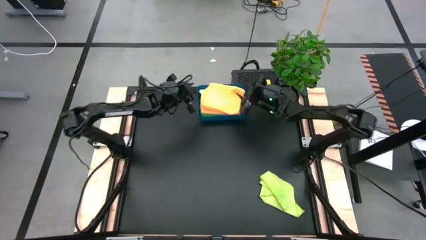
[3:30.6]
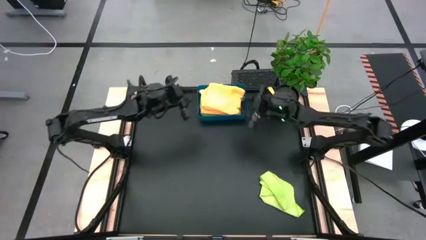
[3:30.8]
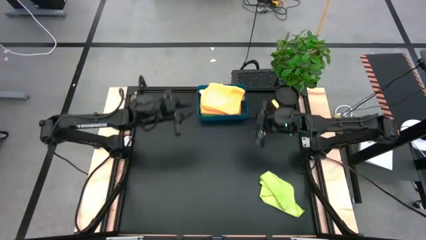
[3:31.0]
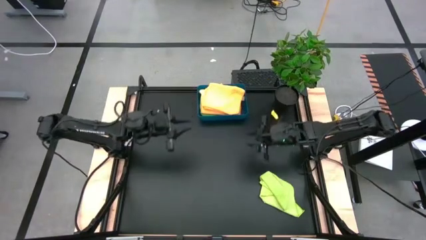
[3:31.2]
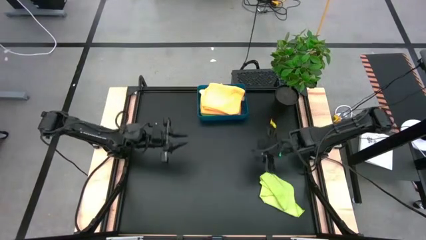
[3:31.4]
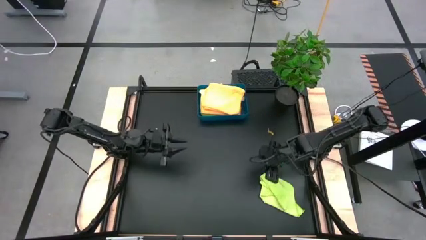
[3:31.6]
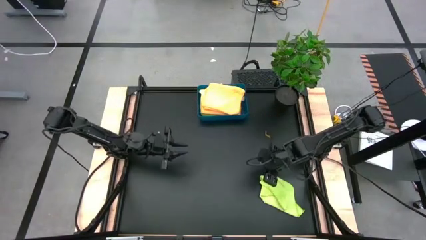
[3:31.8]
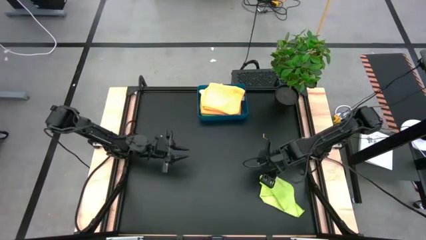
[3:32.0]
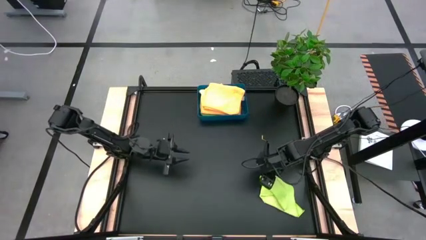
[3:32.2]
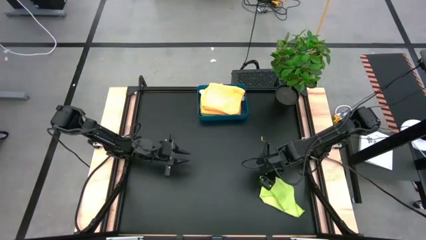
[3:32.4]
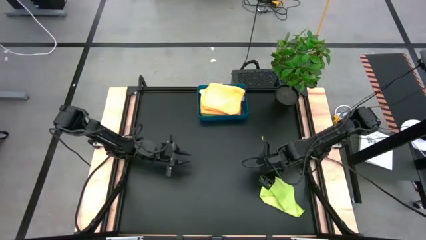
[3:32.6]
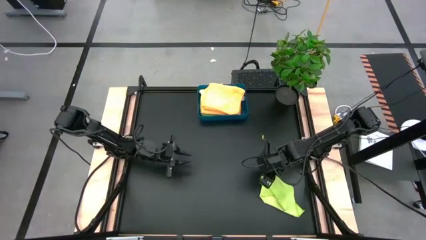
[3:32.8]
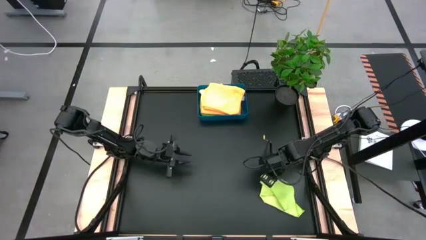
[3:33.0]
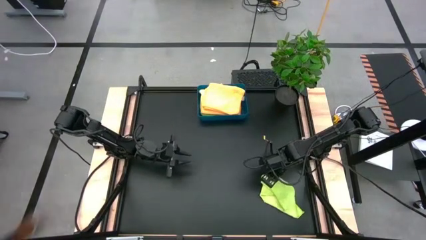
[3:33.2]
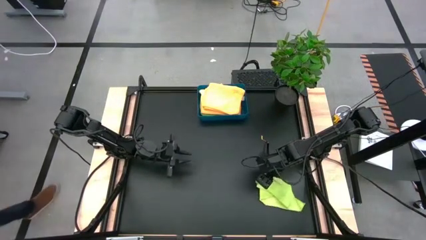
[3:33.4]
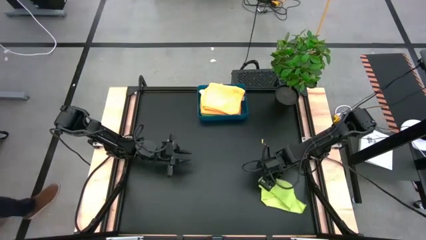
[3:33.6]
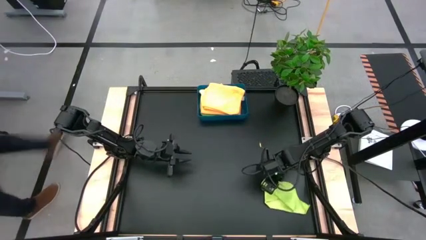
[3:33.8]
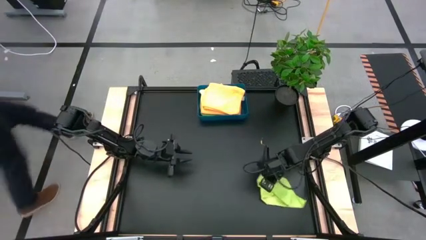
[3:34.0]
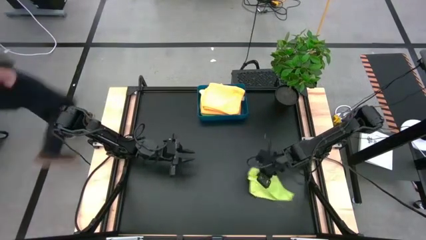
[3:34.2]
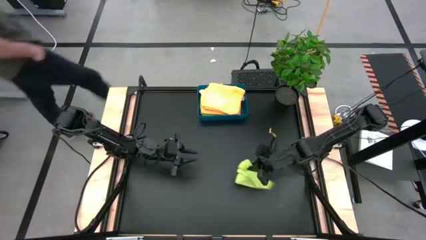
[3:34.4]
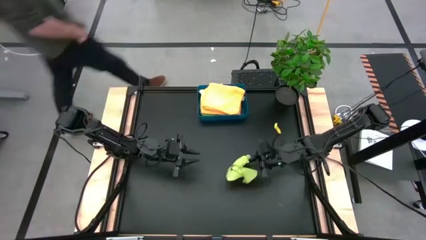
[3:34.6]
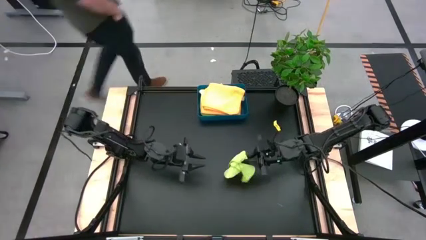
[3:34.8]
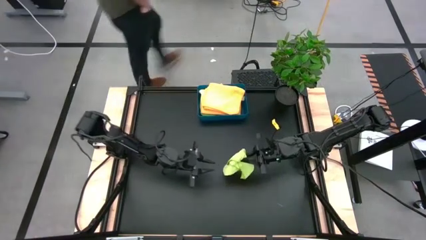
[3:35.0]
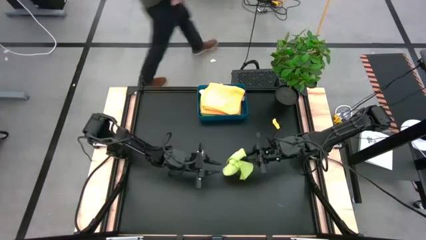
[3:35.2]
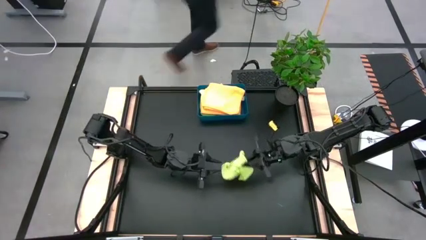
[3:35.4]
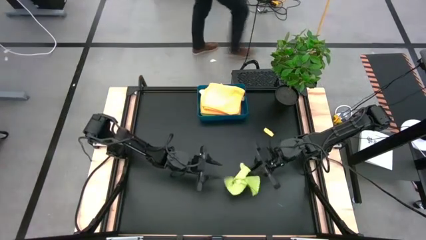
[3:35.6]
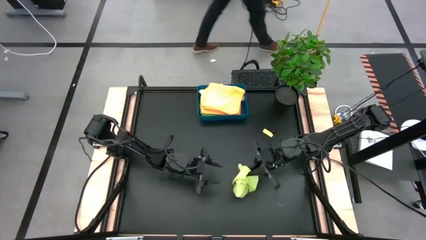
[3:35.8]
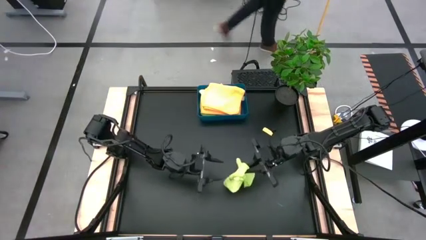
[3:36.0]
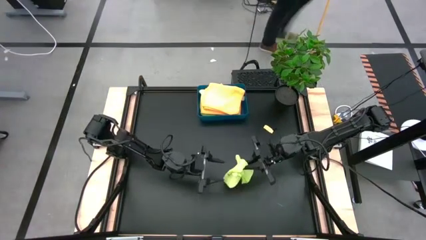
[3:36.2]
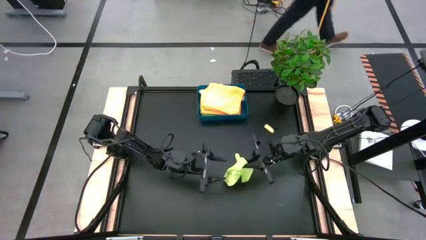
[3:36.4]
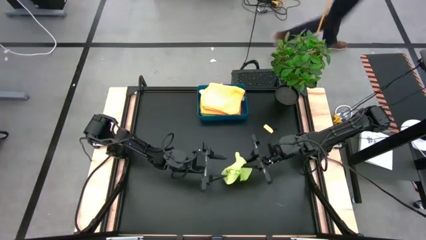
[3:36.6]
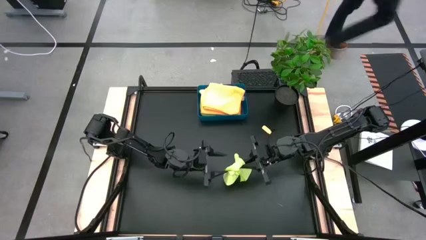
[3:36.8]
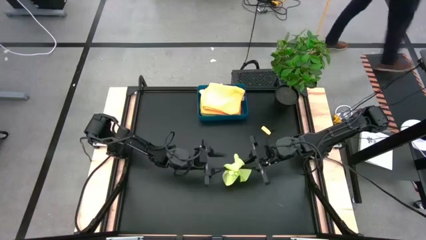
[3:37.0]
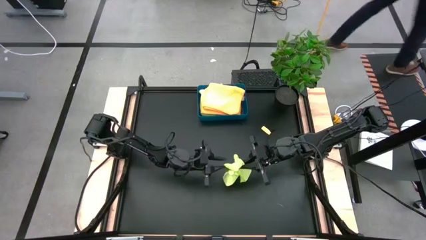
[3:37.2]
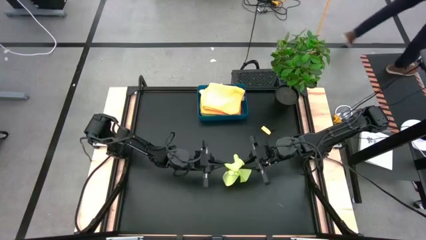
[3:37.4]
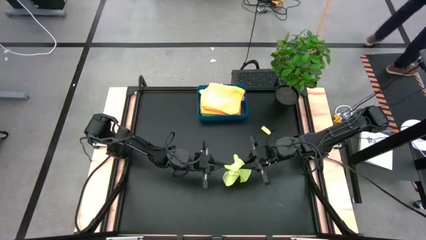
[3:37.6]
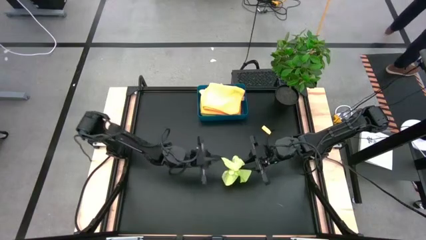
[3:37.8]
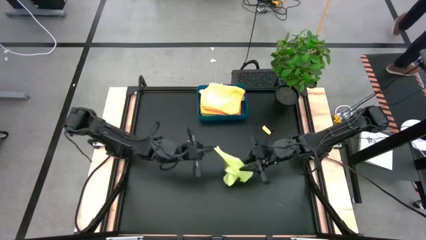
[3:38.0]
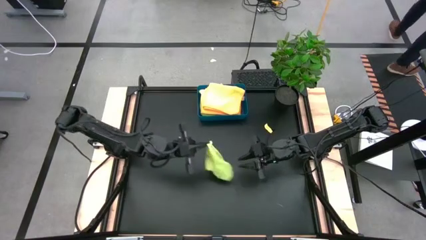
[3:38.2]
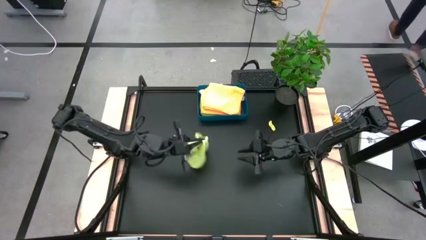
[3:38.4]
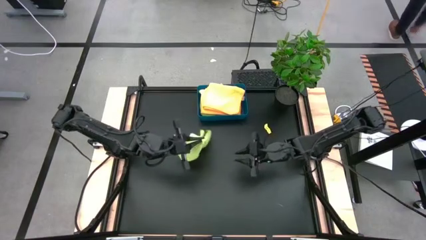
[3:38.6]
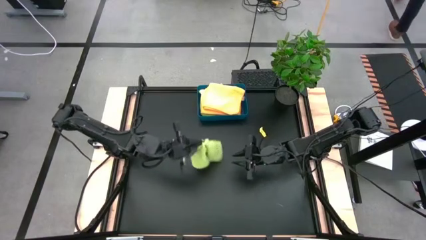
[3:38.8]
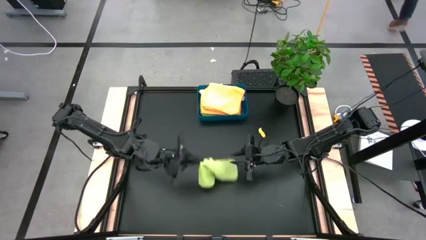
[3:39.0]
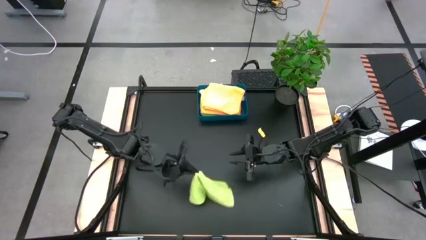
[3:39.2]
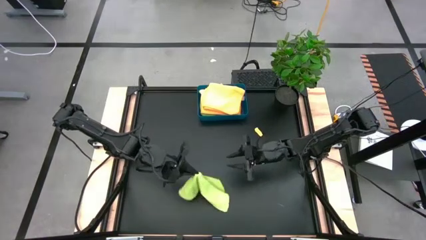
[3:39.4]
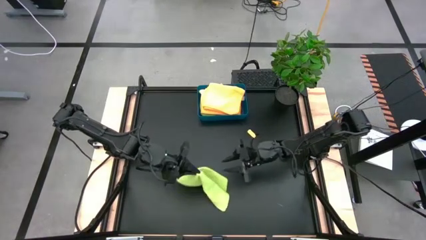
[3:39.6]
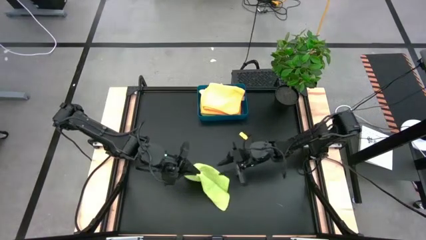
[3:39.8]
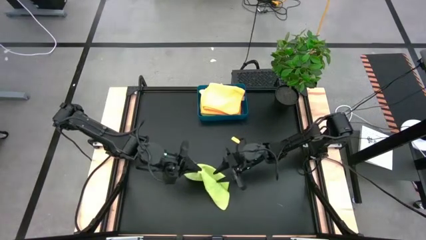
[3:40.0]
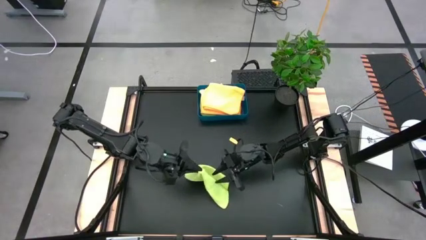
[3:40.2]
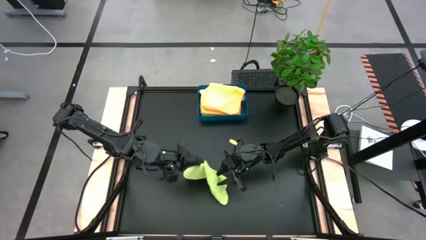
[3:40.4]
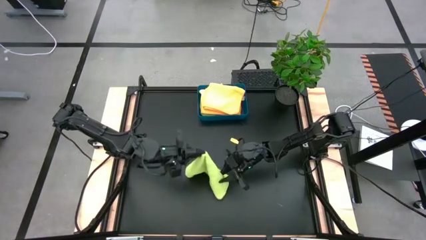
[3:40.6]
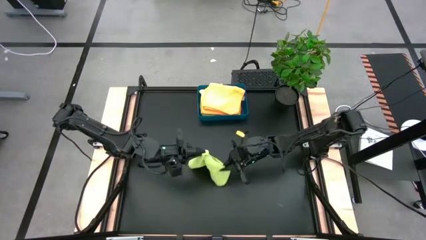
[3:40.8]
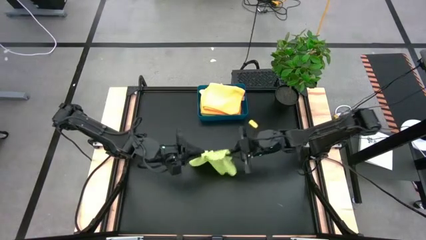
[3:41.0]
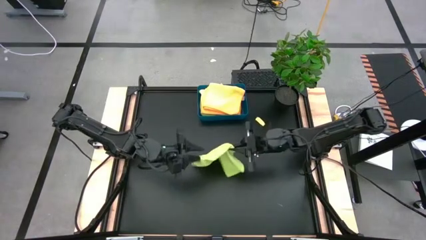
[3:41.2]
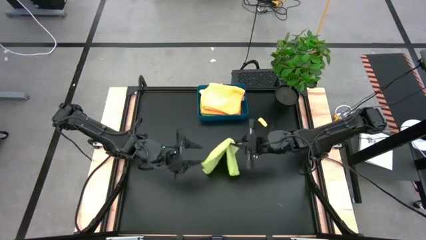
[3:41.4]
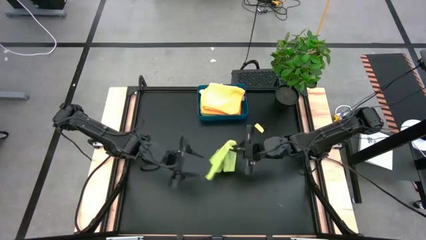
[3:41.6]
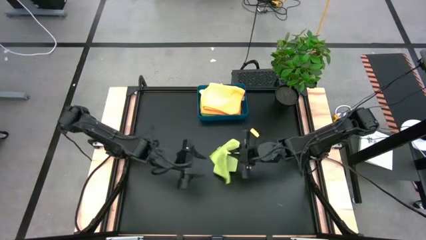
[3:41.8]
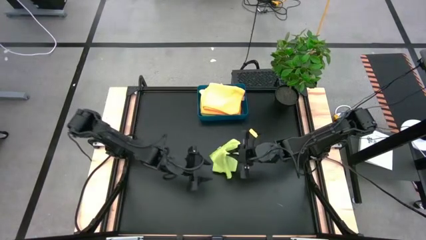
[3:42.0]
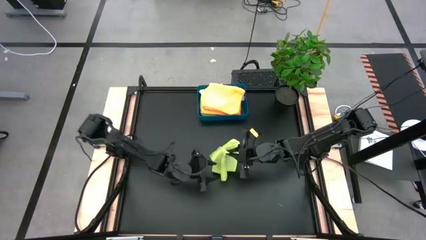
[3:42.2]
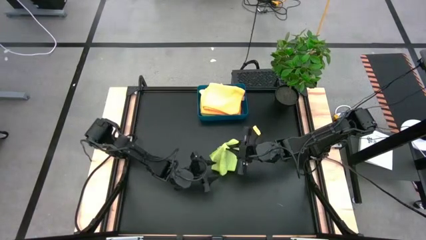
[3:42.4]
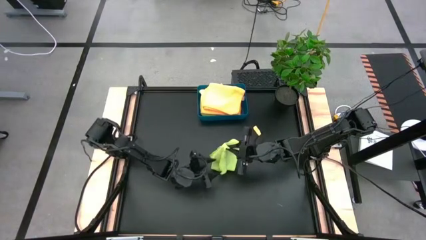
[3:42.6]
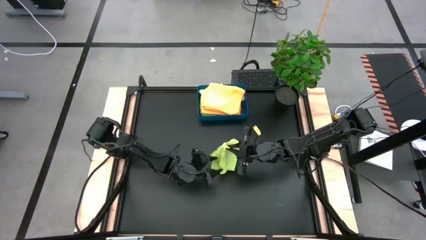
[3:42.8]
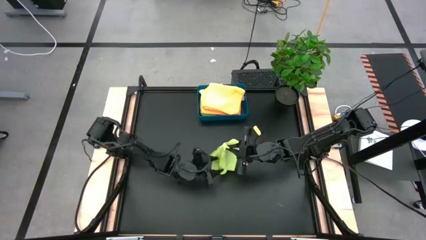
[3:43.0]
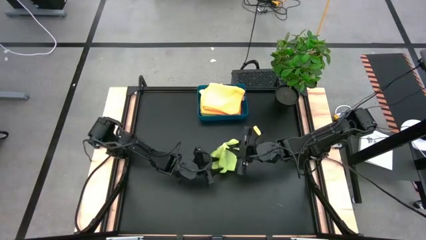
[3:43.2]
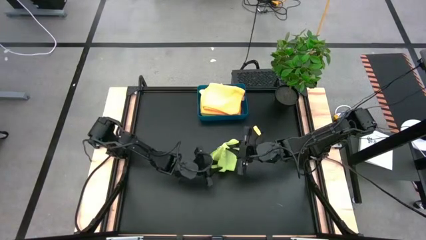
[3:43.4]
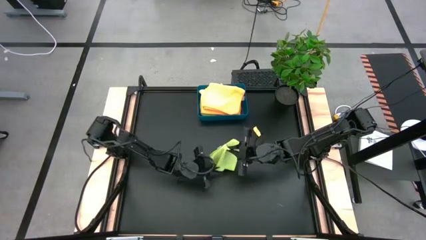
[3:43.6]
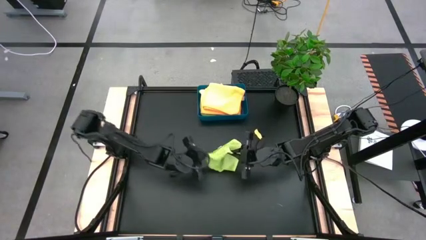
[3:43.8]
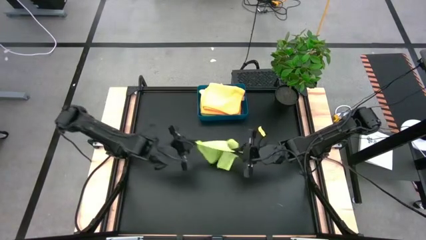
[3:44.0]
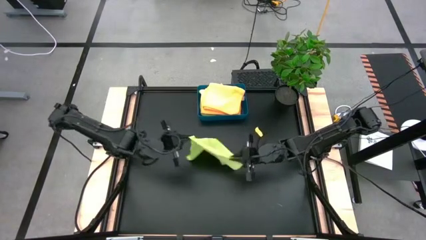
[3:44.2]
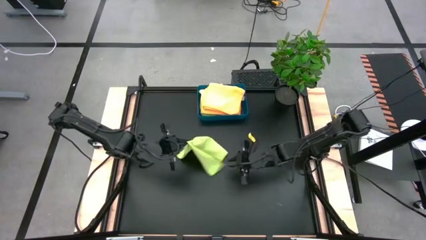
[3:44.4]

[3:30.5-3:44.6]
Task: Fold microfiber towels
Fold the green microfiber towel
